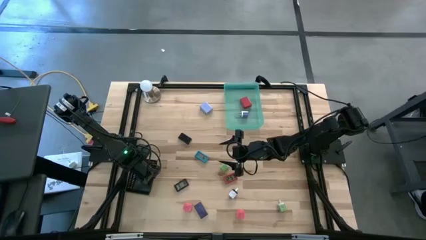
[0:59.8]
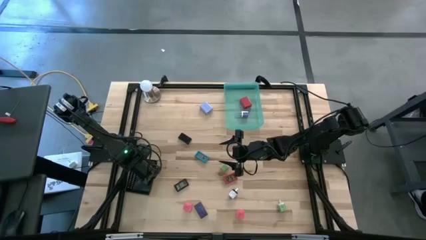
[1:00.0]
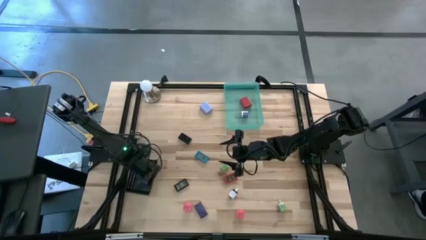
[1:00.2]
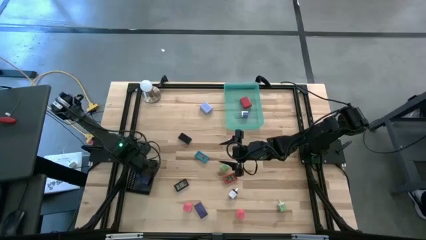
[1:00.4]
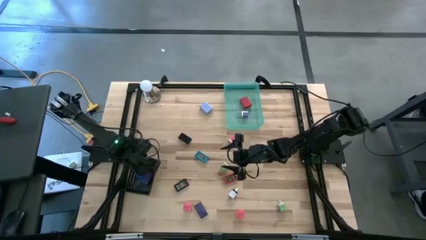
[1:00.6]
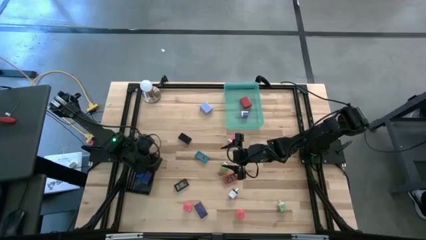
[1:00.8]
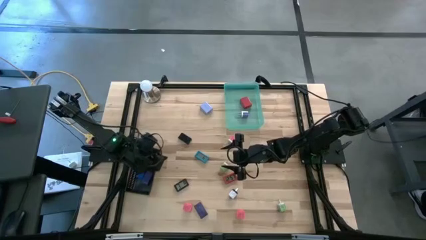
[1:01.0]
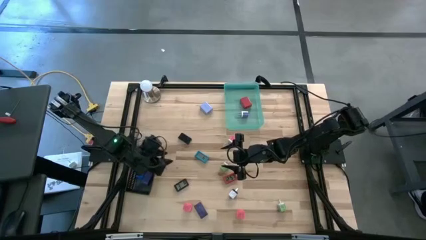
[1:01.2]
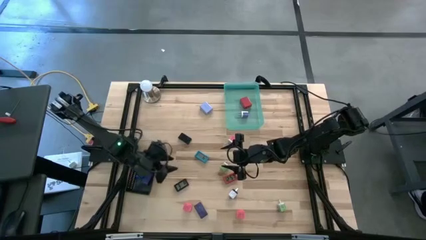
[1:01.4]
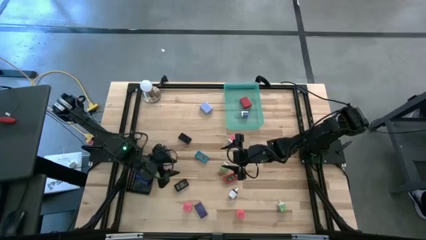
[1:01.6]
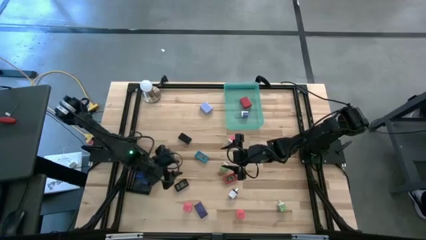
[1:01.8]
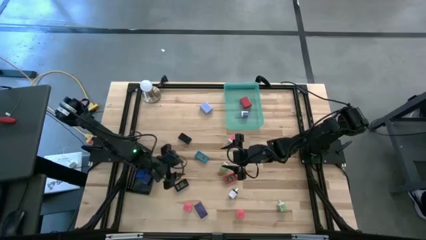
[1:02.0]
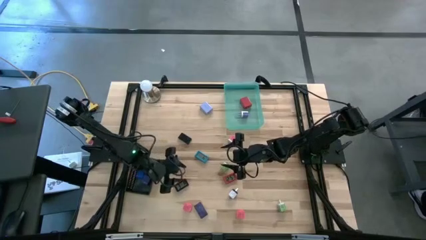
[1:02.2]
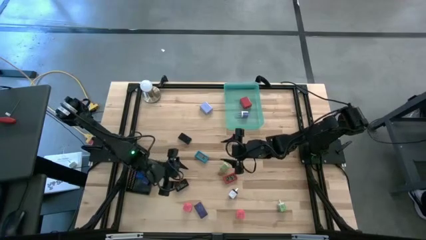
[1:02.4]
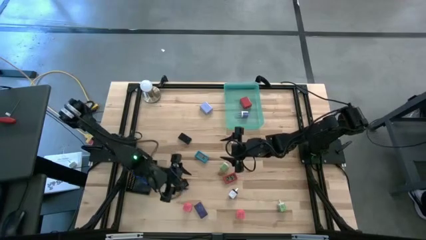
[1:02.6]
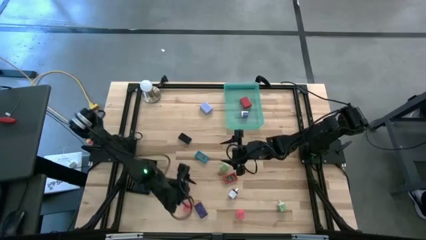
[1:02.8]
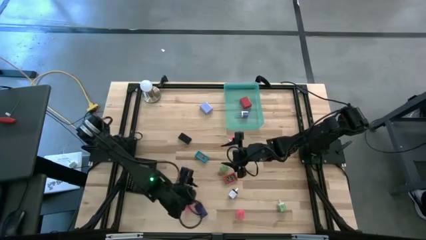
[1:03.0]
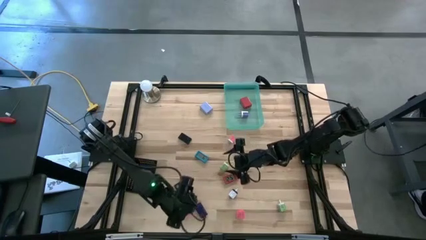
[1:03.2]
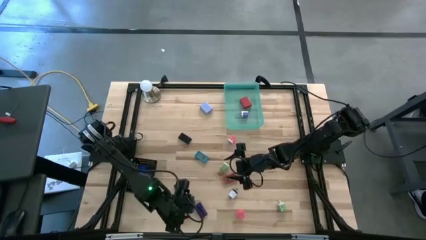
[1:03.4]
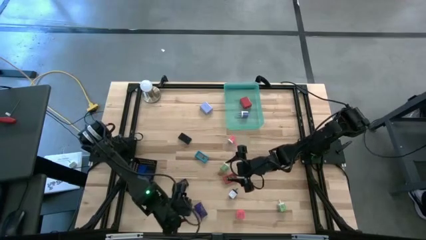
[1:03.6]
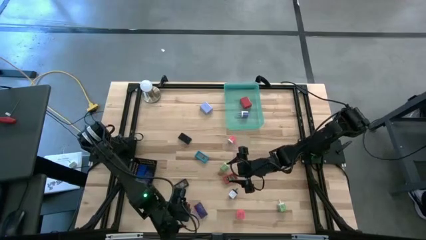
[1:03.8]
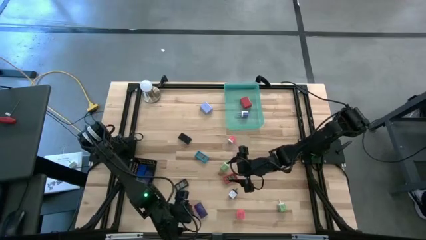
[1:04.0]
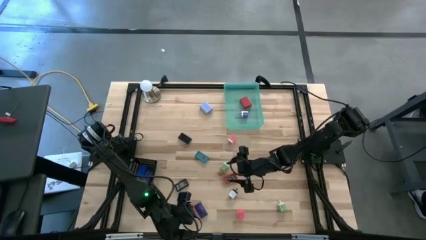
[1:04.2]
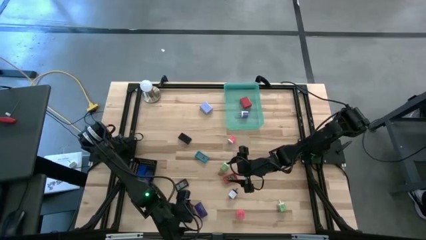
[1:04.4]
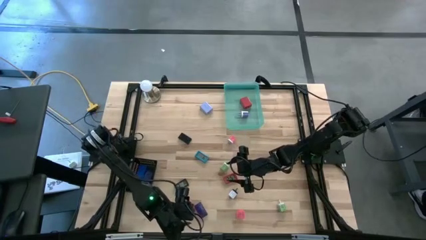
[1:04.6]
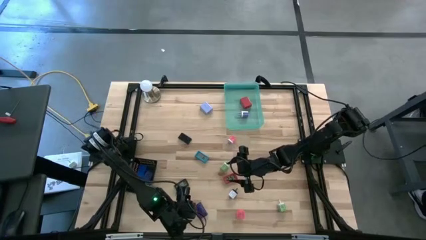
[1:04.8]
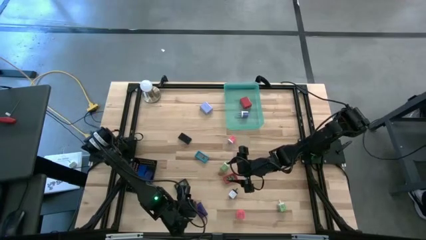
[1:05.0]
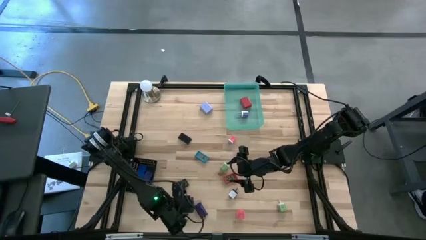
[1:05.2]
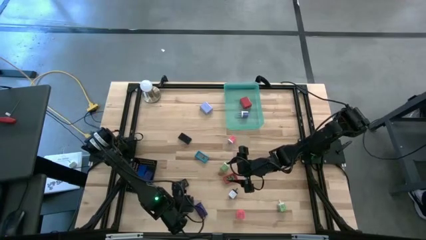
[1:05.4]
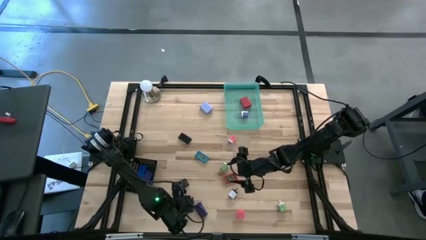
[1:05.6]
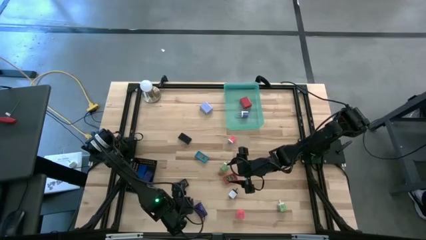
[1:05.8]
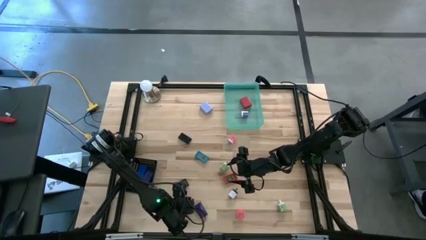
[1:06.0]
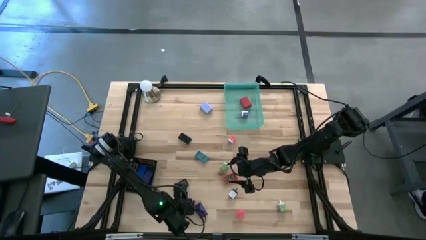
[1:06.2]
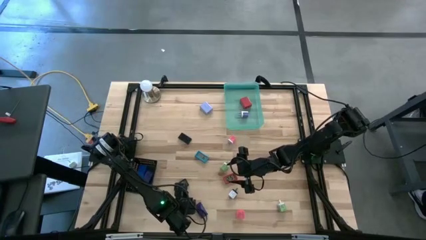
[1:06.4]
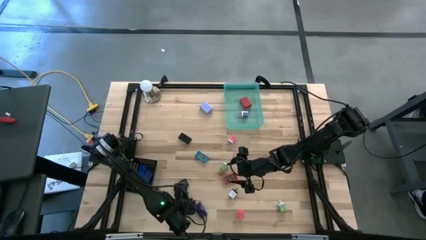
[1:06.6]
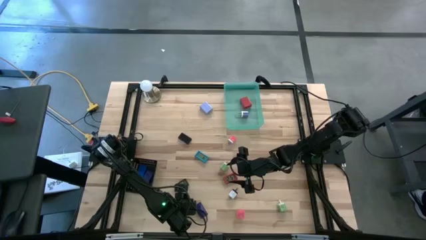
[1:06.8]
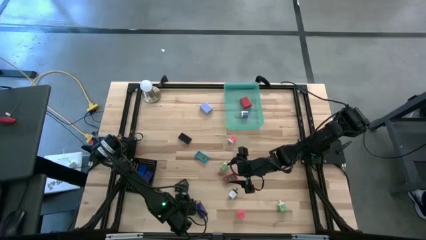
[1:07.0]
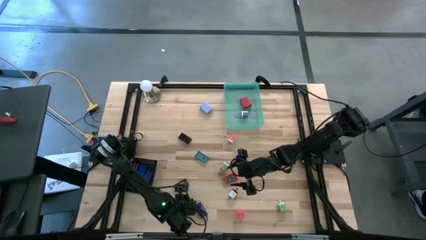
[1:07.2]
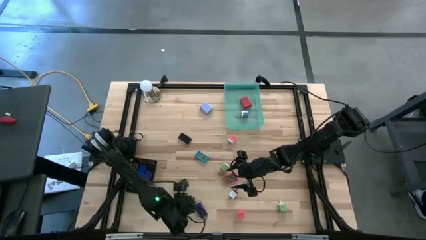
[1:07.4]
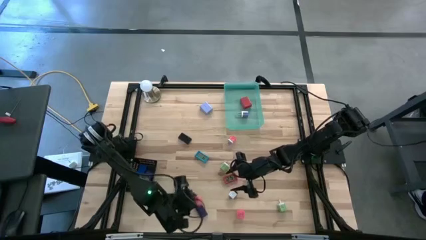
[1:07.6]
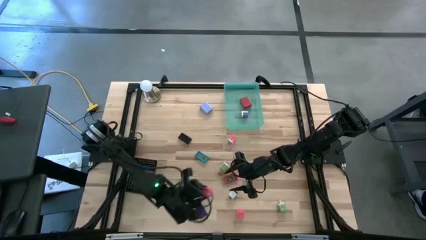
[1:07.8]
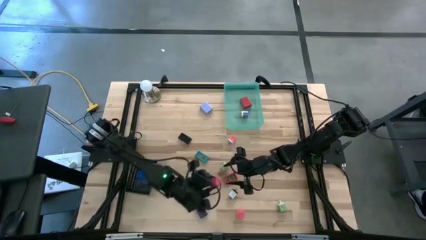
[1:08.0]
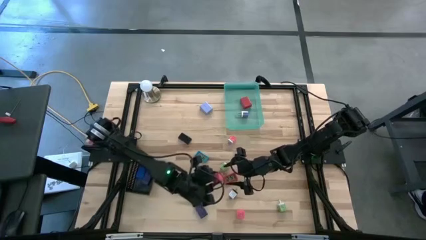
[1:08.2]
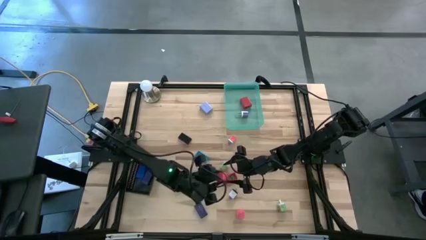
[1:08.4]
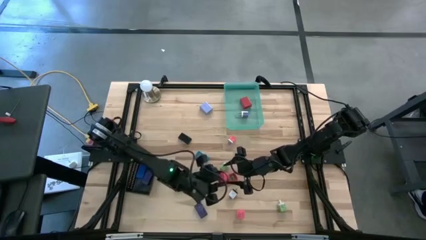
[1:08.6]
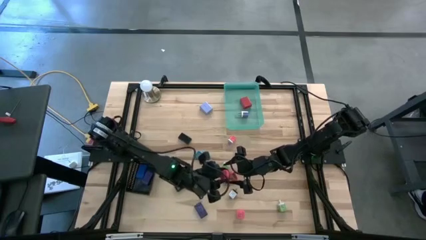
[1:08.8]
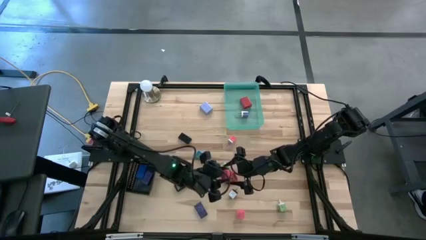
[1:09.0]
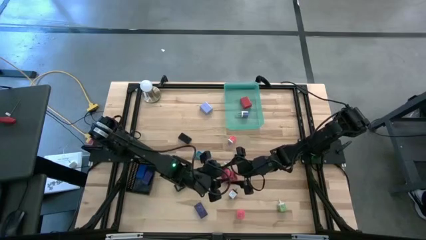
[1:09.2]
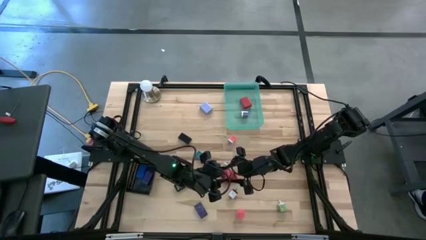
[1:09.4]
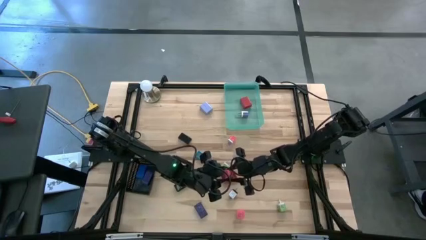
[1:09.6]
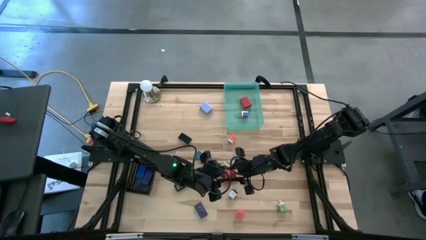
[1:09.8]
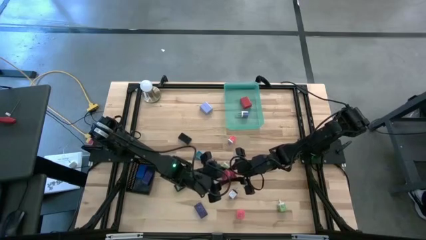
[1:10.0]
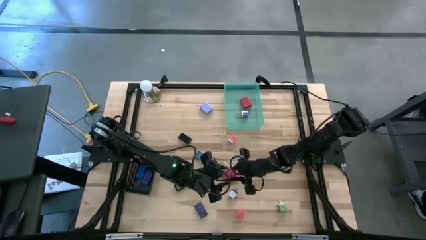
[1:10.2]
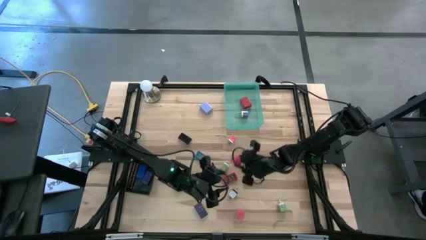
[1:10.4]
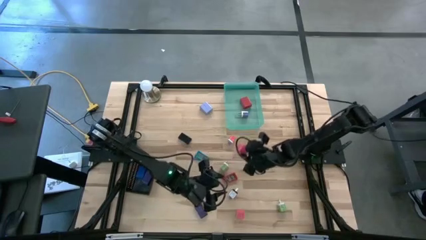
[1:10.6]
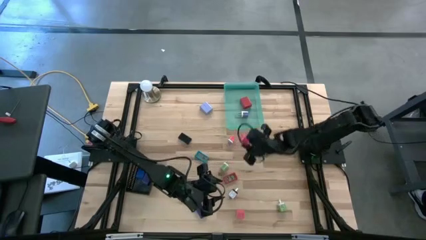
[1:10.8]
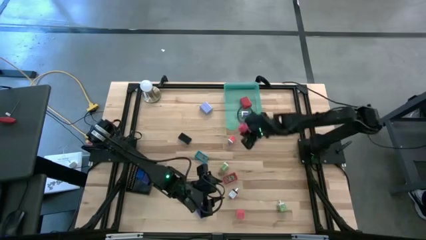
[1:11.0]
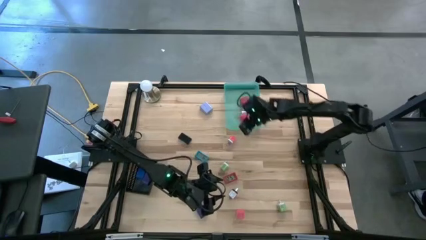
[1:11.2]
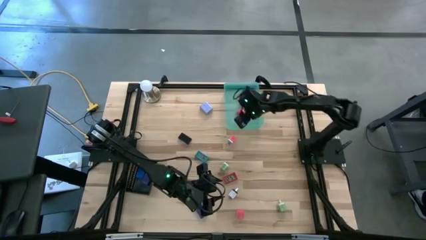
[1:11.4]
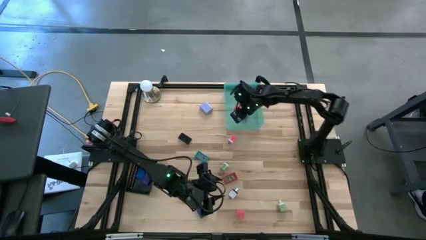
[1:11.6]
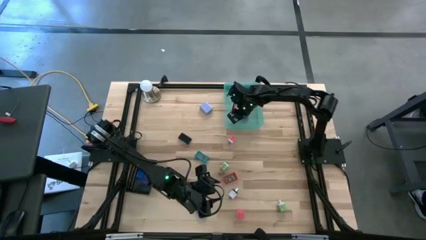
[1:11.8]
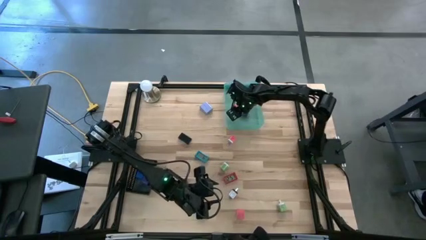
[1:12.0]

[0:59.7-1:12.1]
Task: Pick & Place Office items
Put the left pink charger adapter into the green bin
